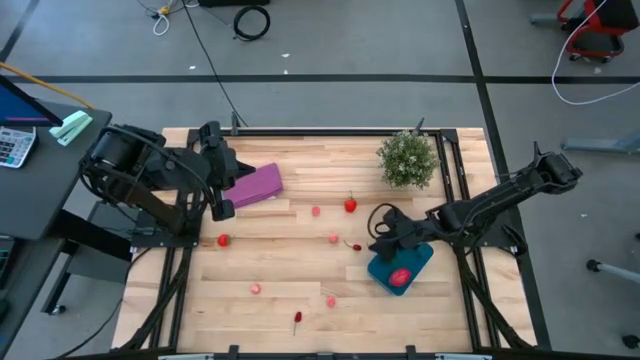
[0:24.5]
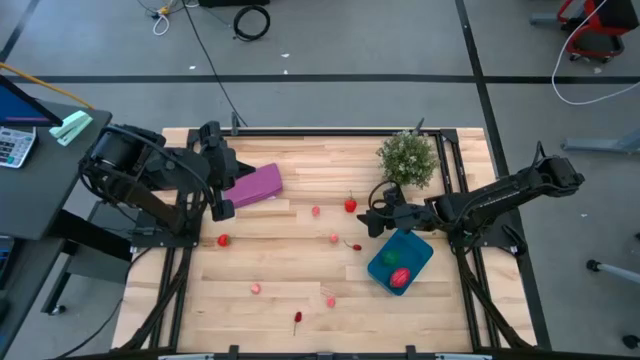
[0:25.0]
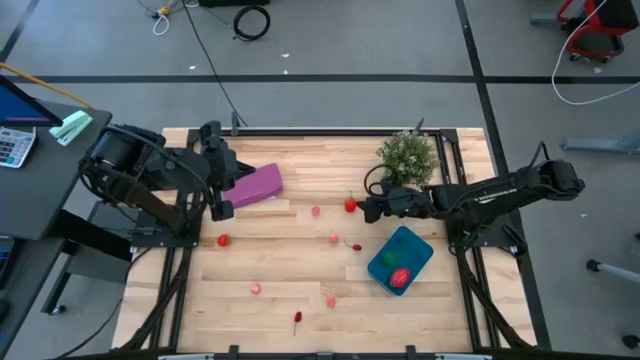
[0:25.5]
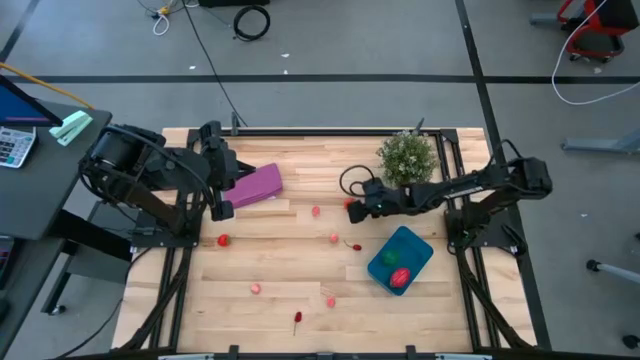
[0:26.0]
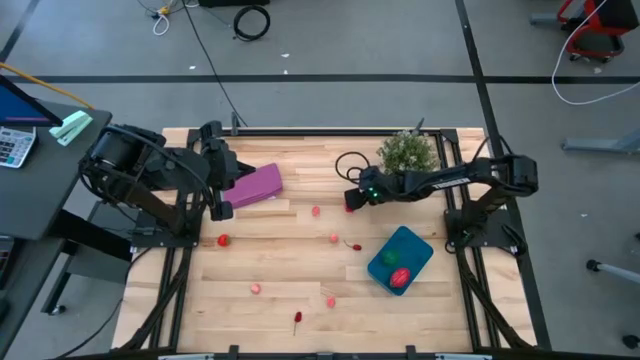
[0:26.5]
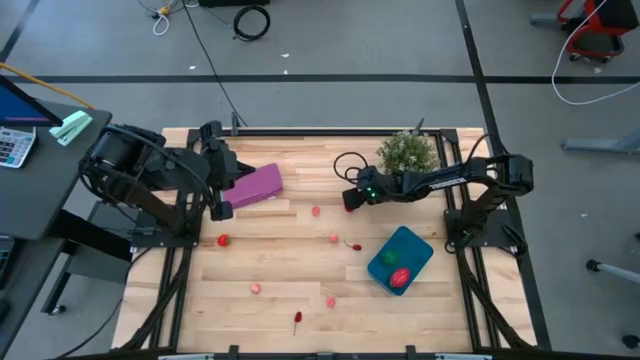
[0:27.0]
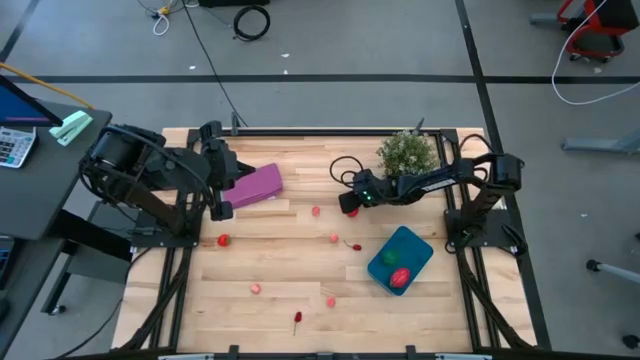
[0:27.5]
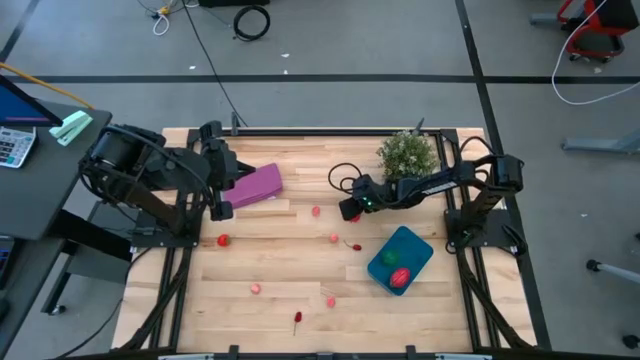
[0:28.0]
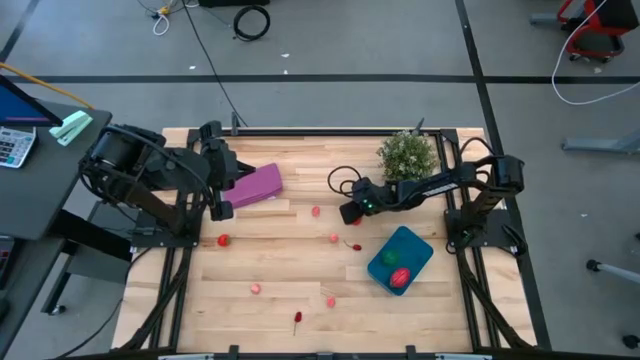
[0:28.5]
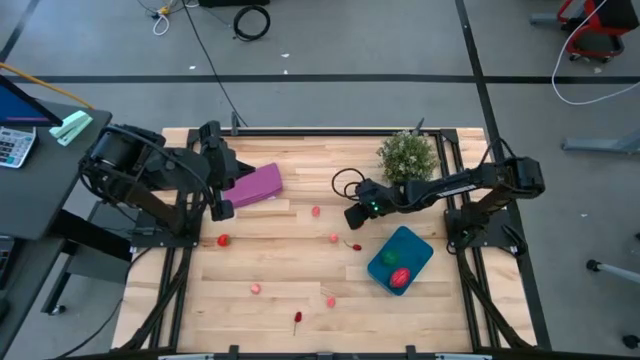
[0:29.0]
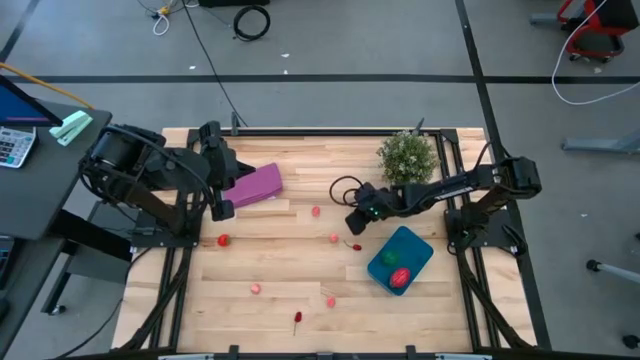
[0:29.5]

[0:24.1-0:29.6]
Task: Pick and placing Produce into tupperware
Put the red strawberry into the blue bin

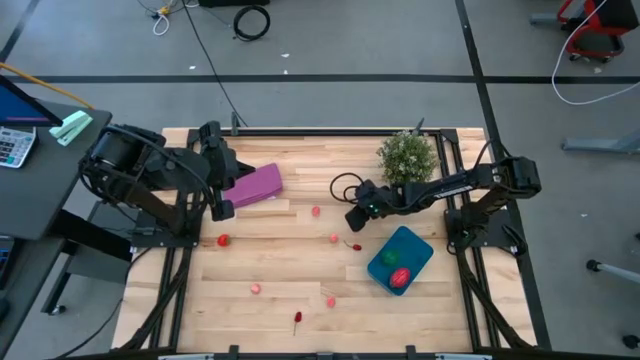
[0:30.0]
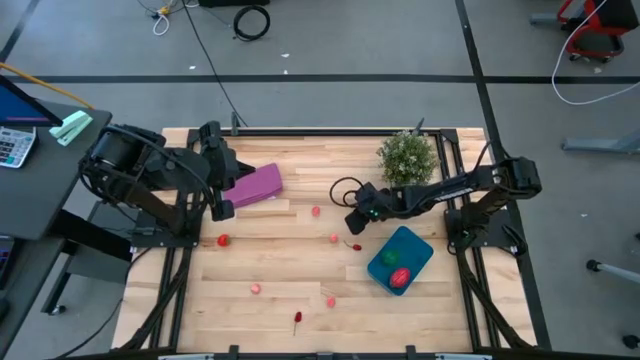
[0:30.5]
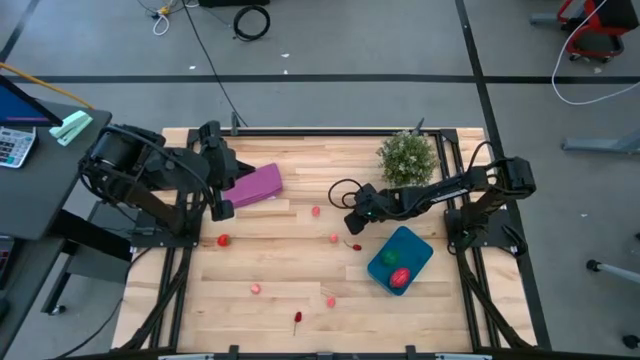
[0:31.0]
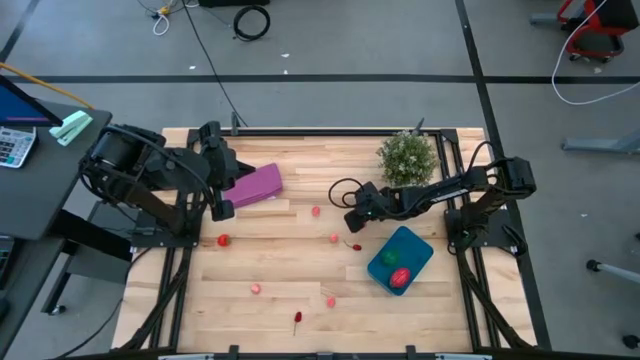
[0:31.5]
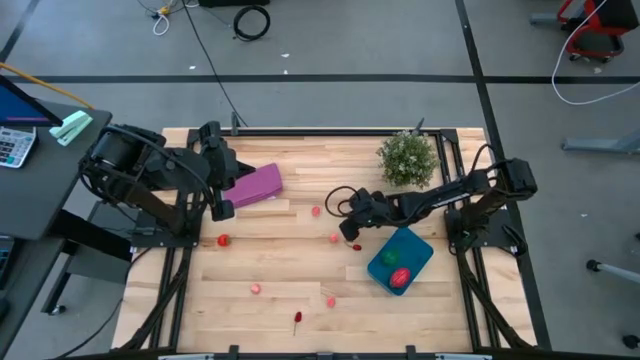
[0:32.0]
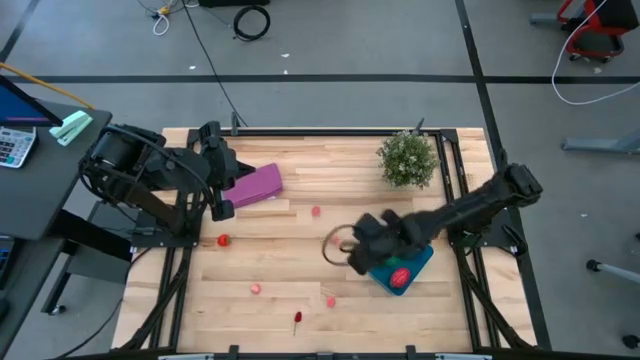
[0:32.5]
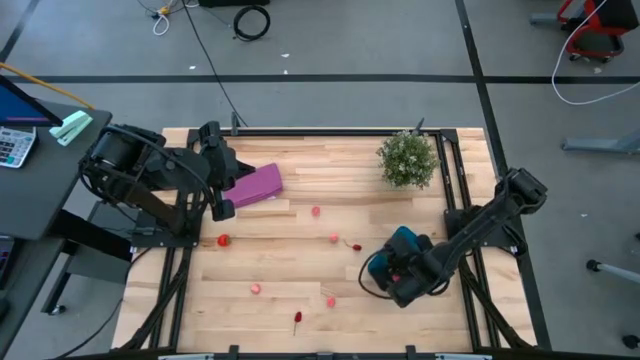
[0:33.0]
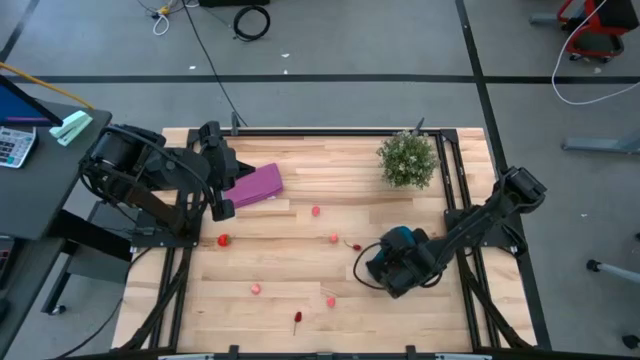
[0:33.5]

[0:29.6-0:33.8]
Put the red strawberry into the blue bin

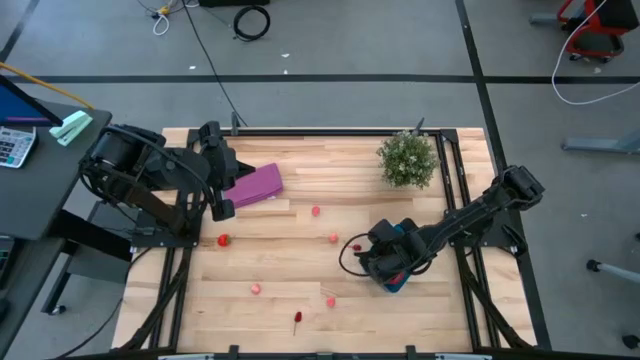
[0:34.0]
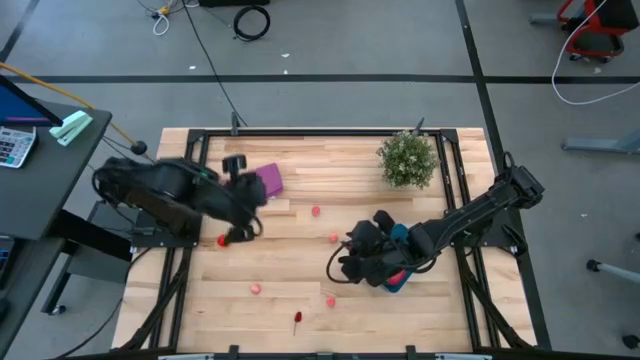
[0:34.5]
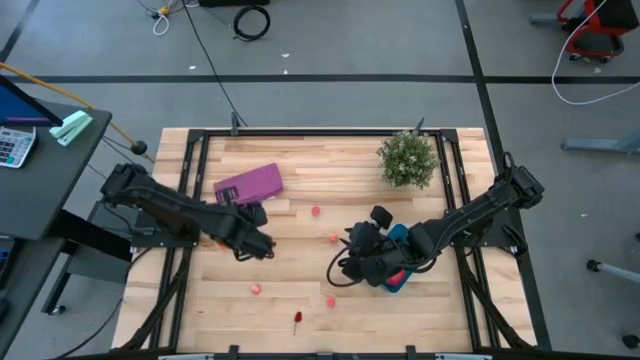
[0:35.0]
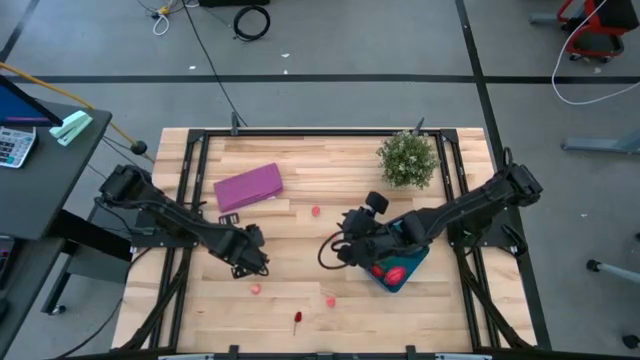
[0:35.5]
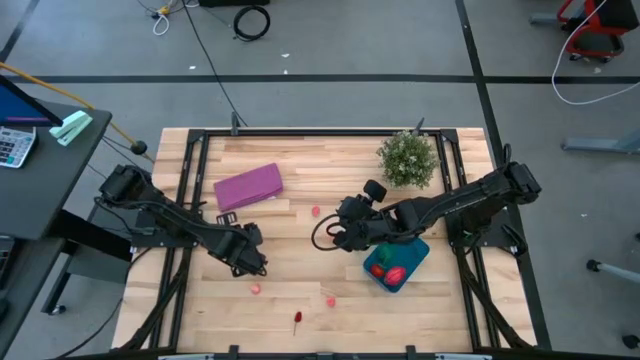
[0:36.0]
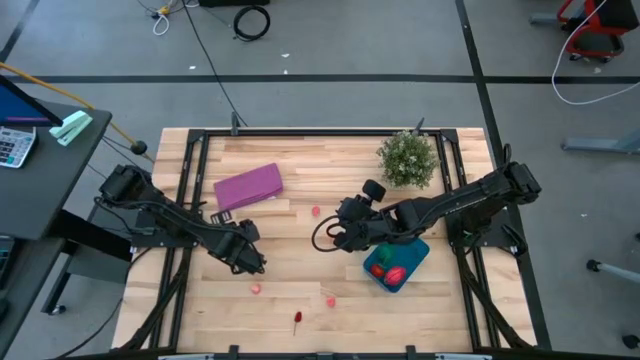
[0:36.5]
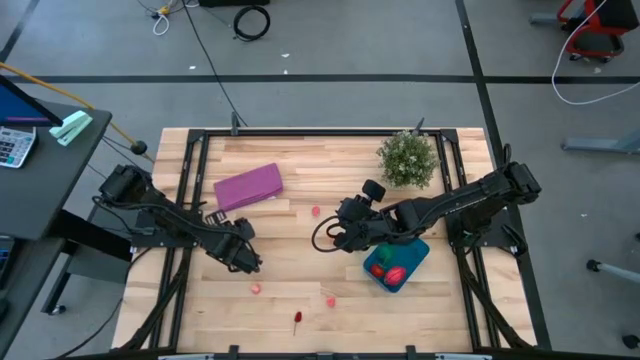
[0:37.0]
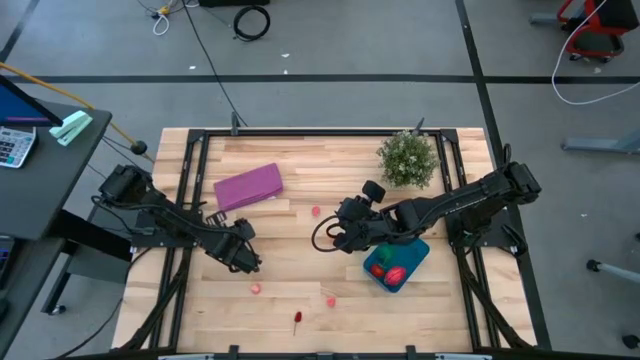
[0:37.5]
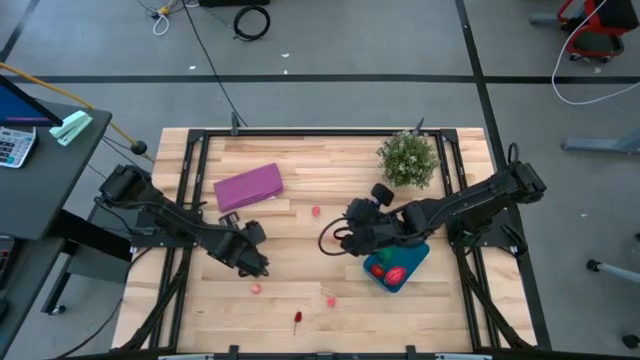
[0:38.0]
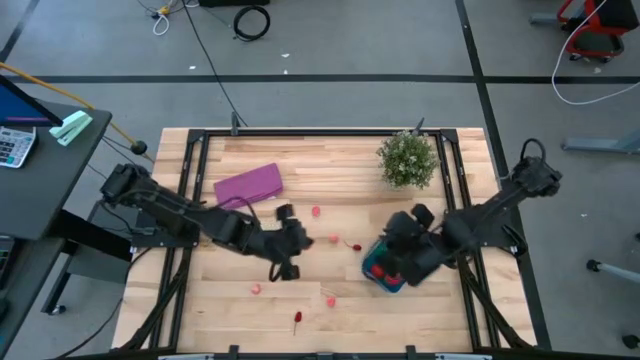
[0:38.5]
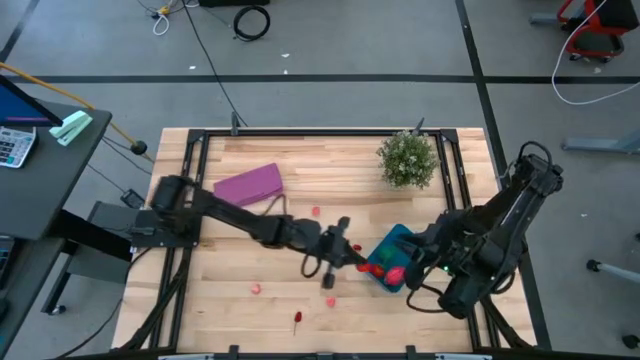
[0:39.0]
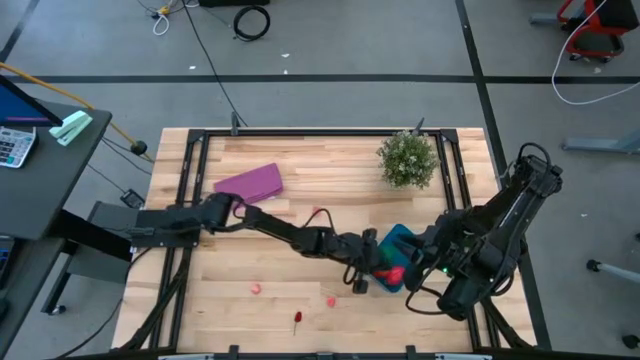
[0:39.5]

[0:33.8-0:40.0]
Put the red strawberry into the blue bin

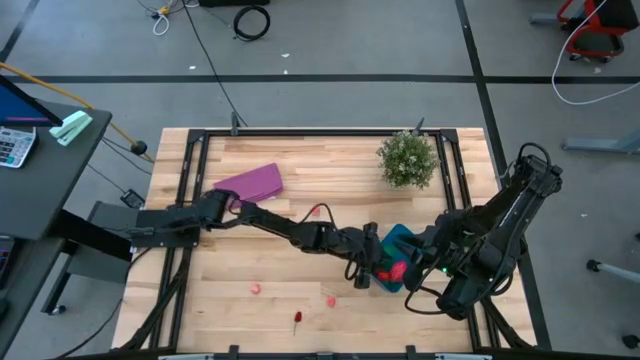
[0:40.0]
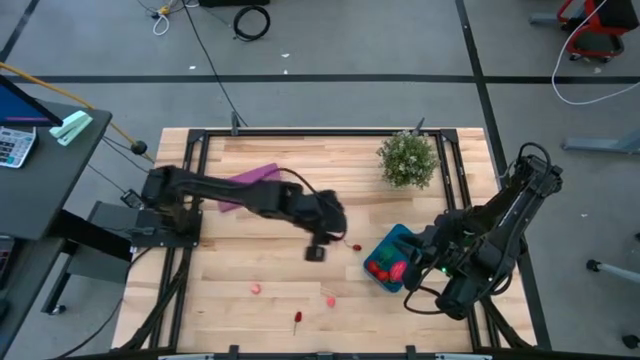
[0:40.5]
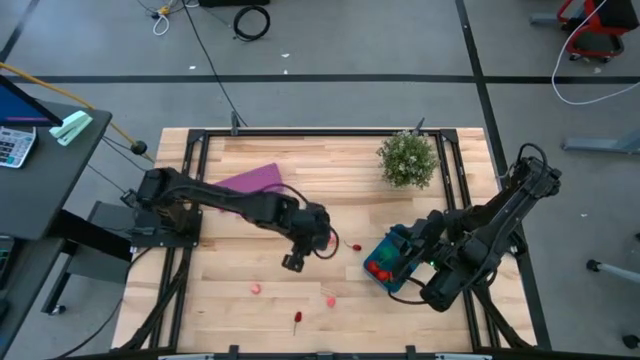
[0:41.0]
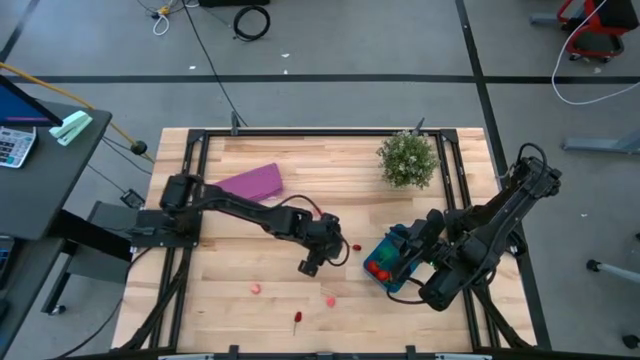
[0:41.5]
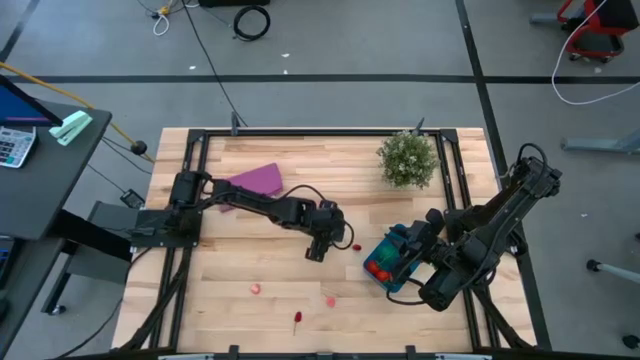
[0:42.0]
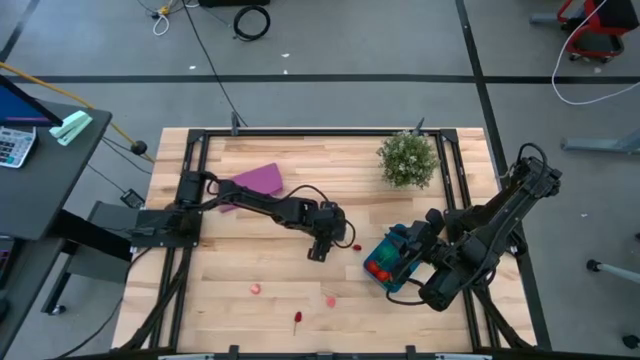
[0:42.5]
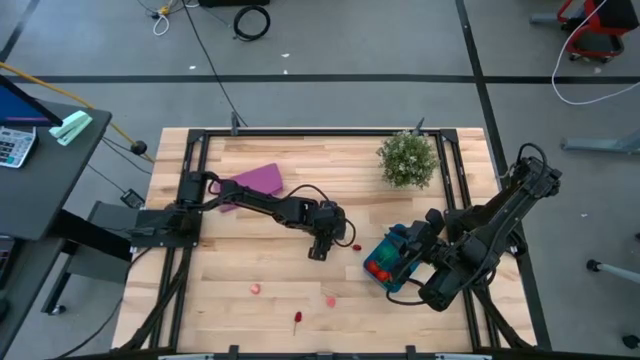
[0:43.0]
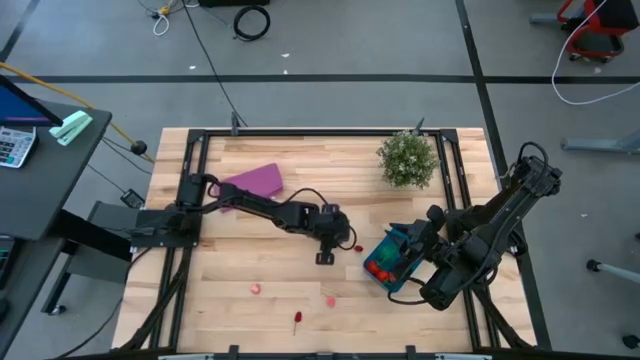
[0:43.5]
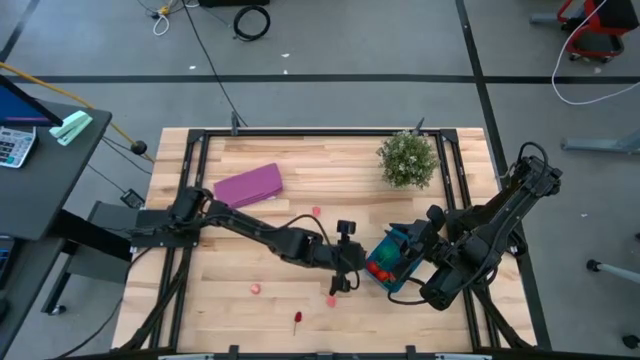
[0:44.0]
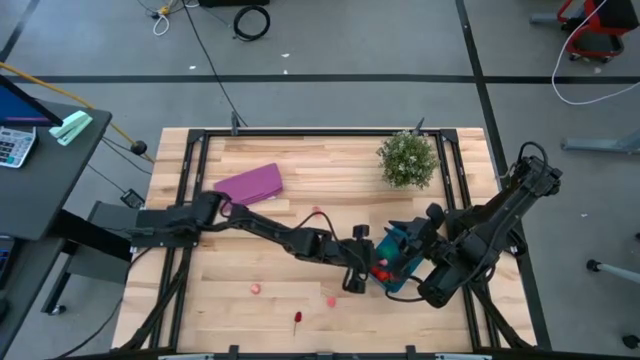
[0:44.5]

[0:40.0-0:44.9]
Put the pink peach into the blue bin

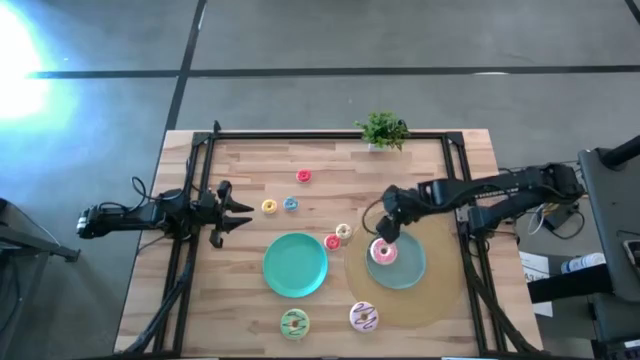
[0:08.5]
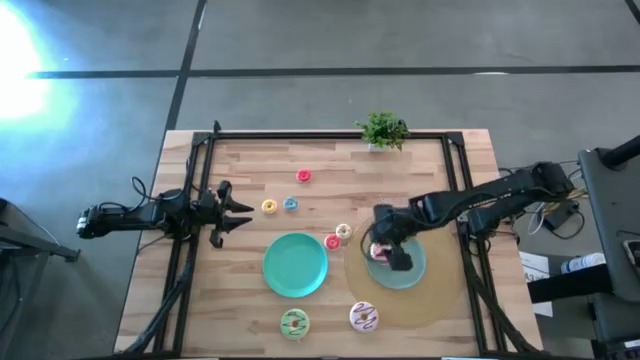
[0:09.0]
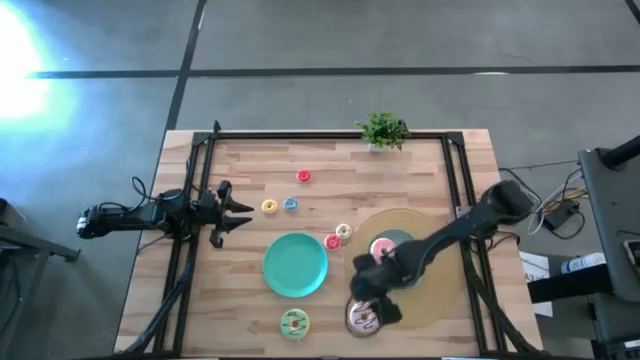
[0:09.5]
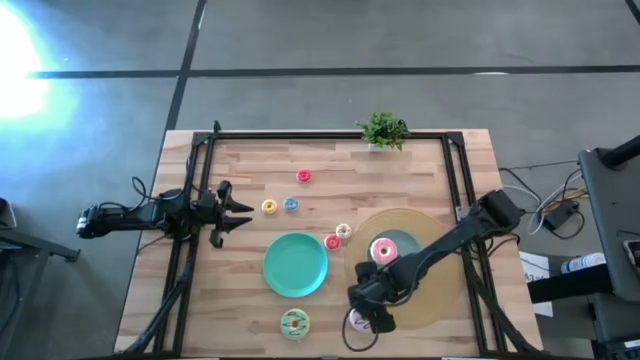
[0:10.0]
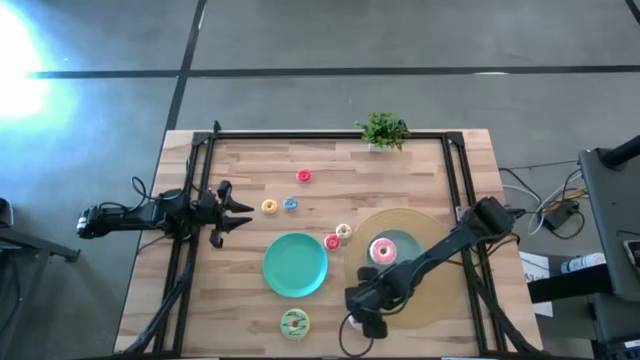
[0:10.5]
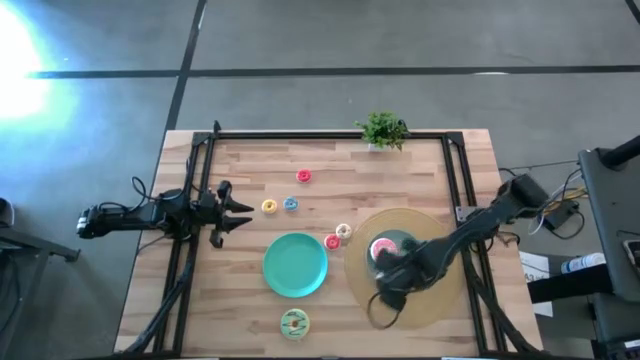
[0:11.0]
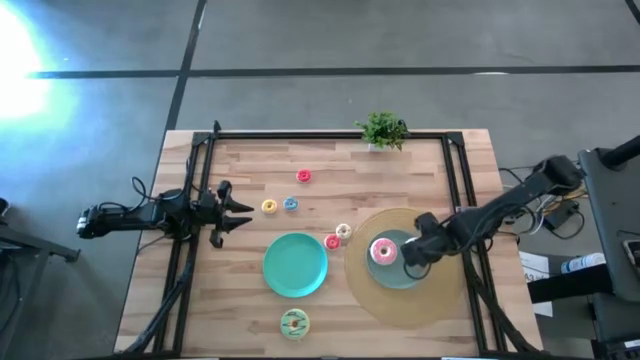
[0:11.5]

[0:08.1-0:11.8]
Task: Pick & Place donuts
Put the large purple donut on the light blue plate
